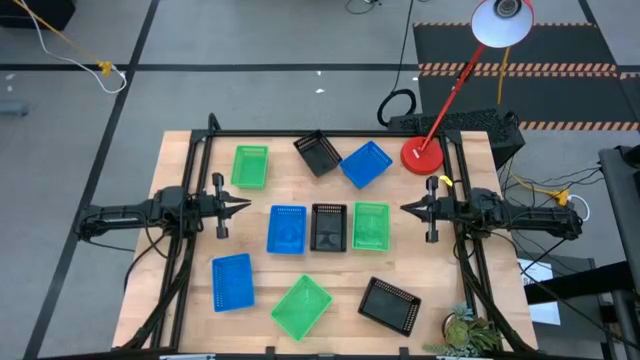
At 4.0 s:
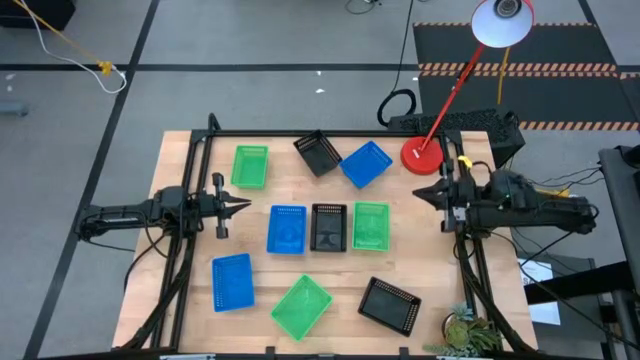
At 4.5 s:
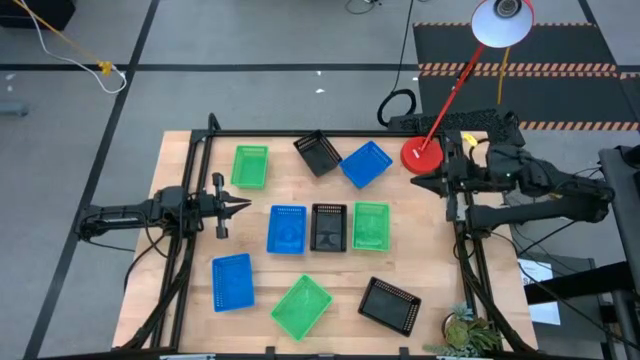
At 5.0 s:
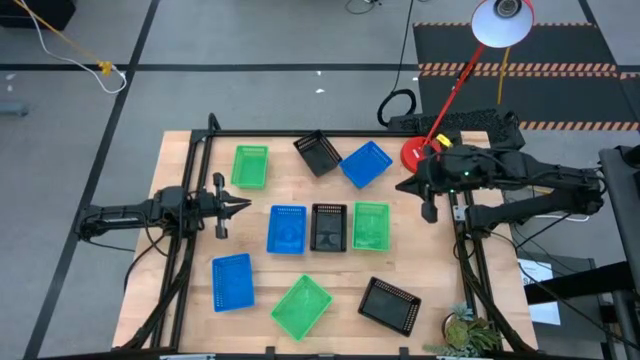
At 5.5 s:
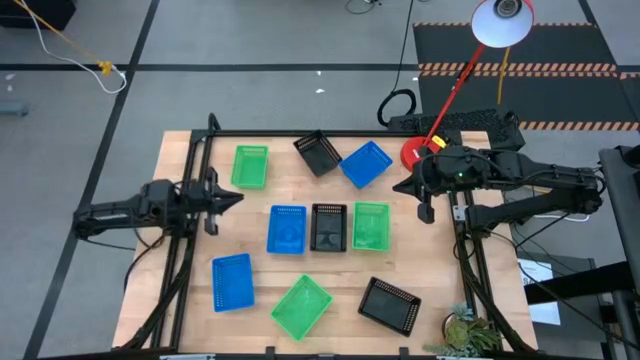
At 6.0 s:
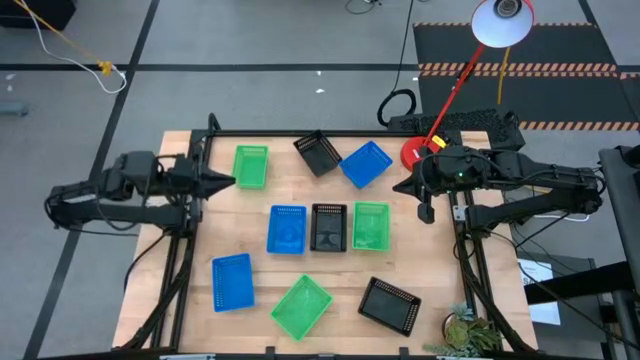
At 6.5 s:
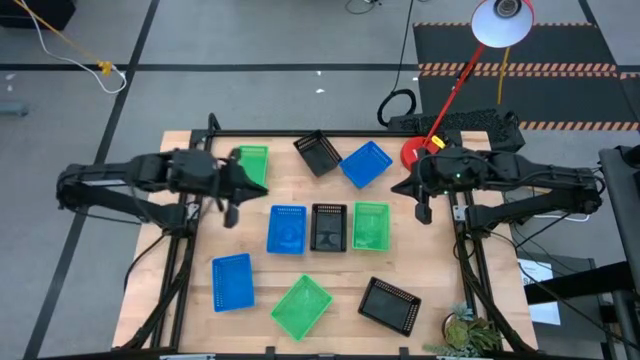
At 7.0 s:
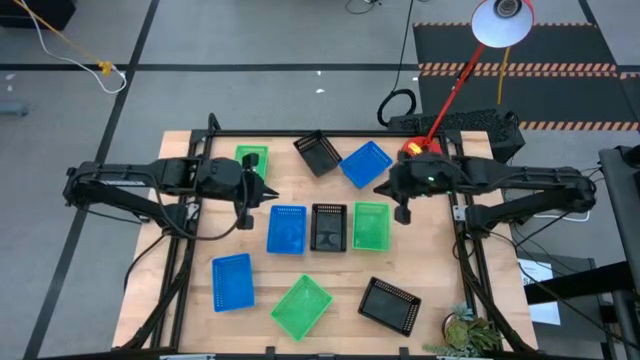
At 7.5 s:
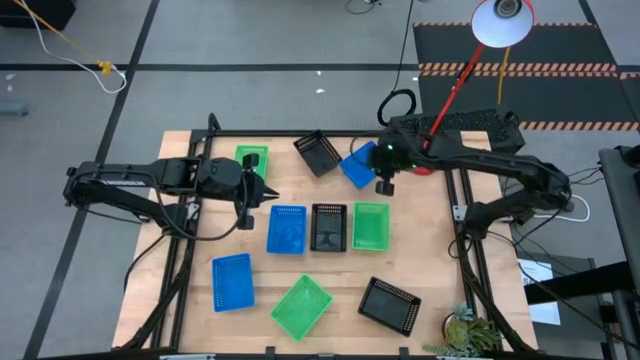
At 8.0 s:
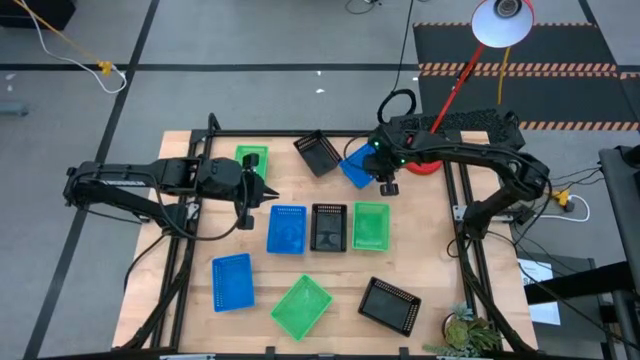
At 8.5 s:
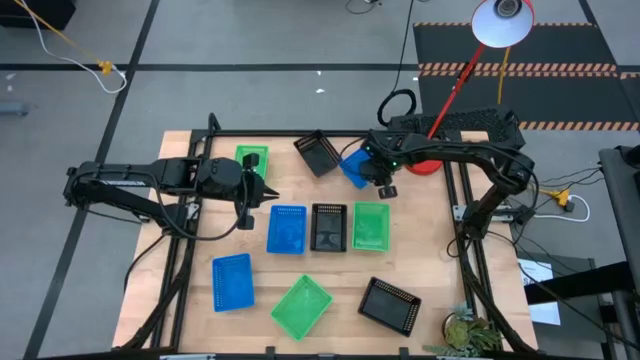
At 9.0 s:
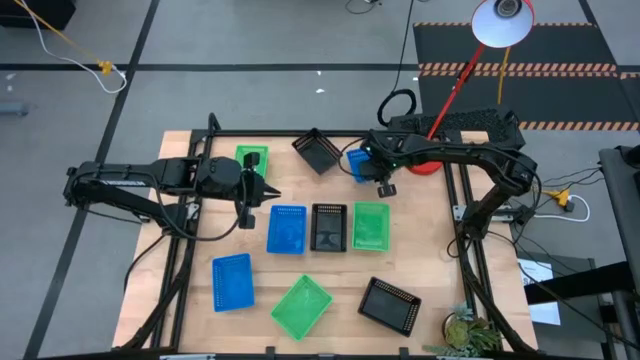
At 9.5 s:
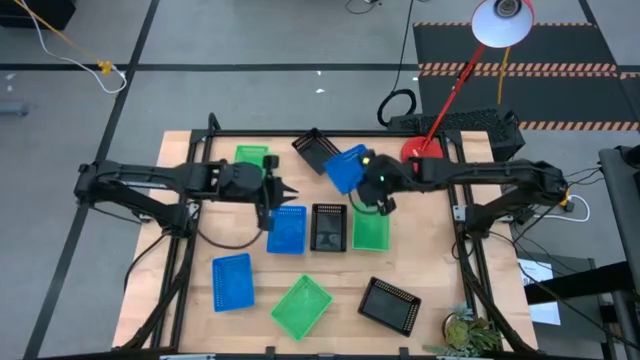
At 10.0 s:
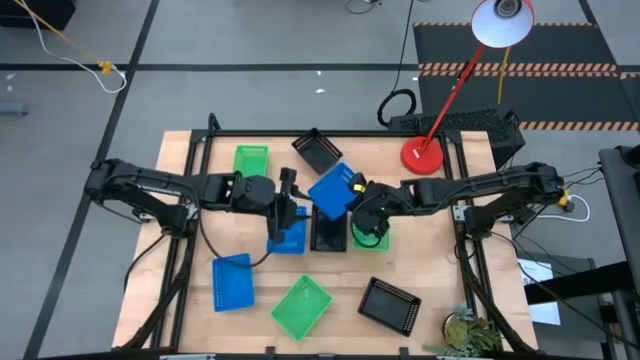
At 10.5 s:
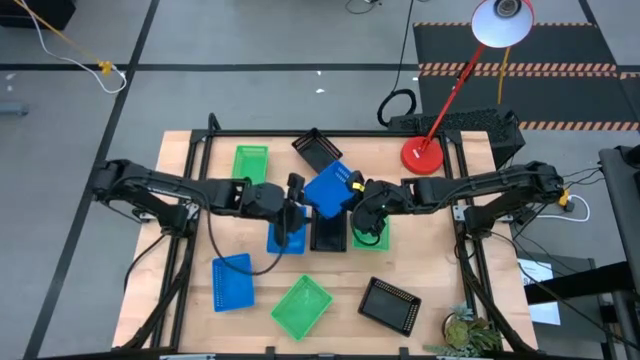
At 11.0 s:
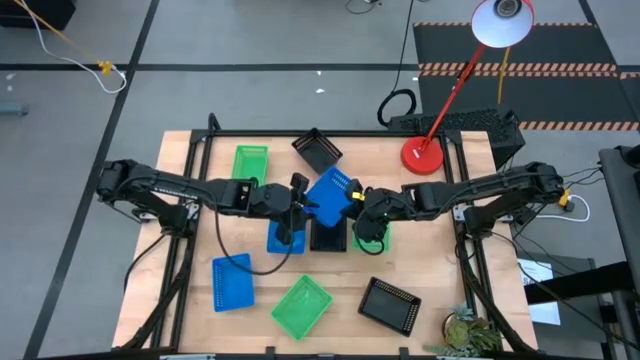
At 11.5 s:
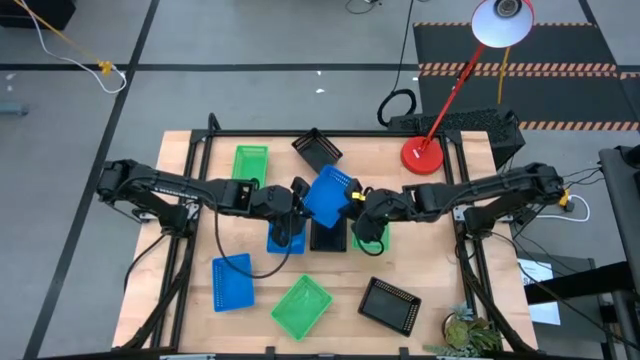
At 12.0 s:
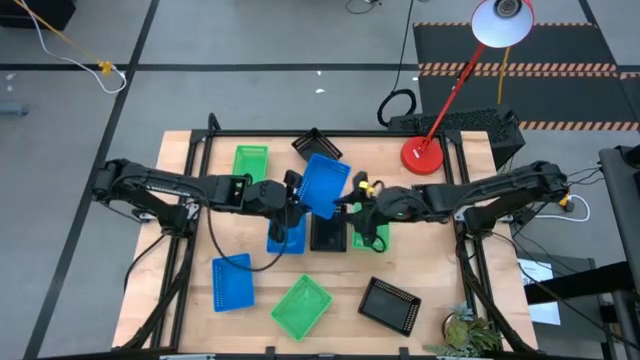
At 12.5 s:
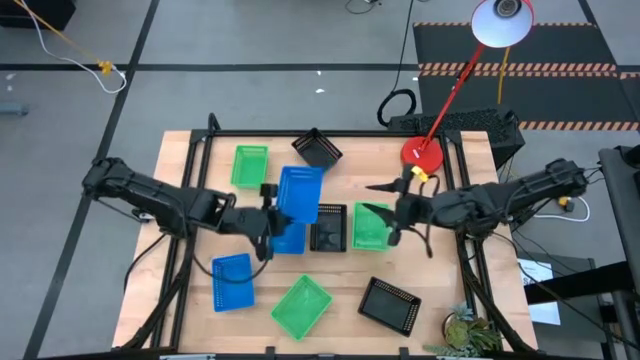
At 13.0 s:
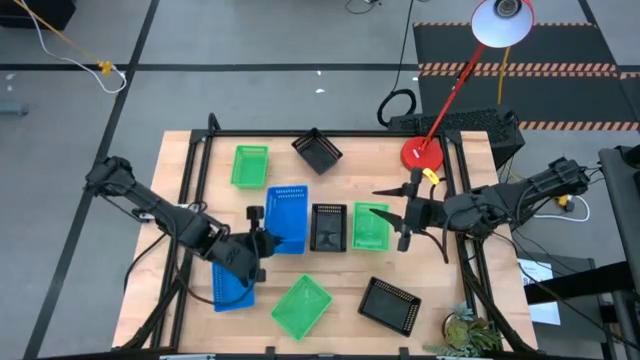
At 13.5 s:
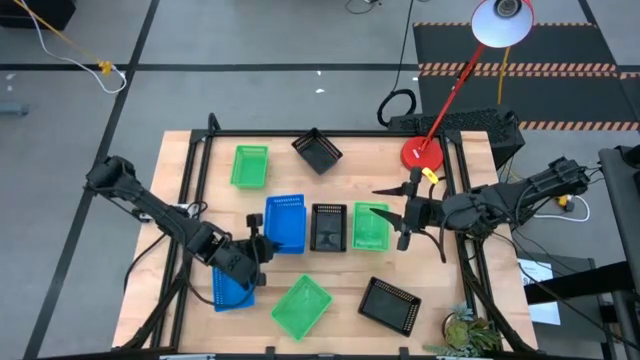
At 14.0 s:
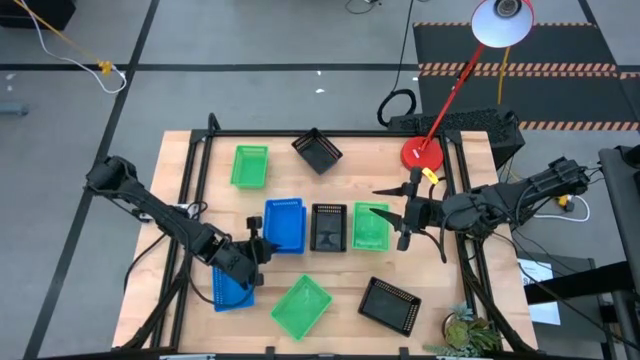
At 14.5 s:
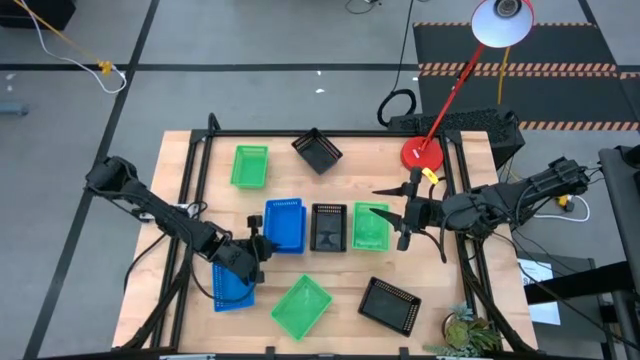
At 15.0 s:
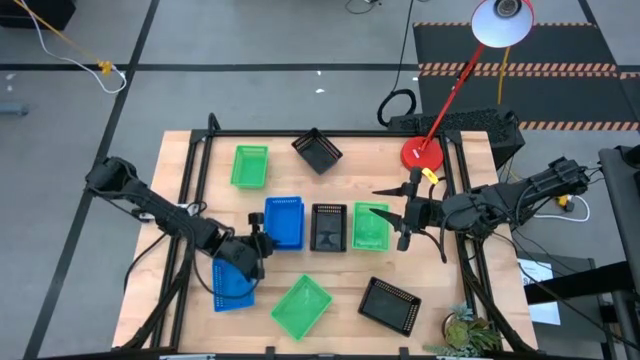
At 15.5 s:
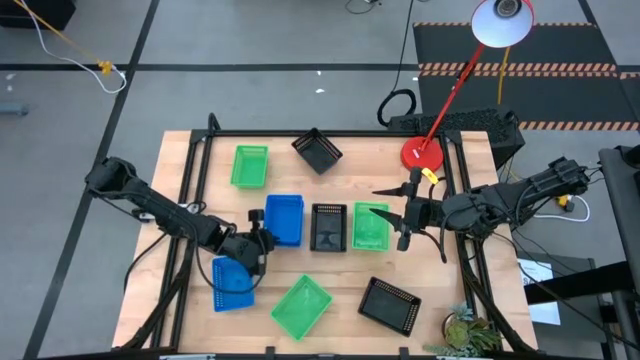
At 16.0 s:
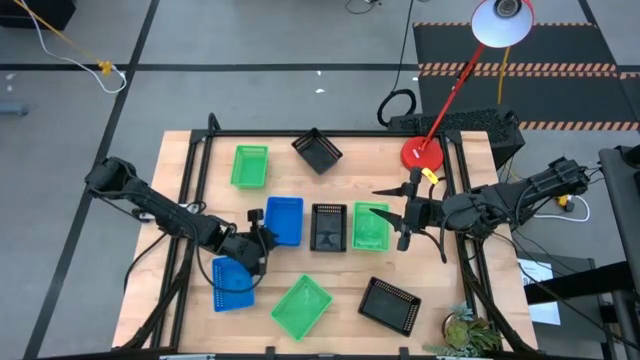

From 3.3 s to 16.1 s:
Stack the top blue bin on the middle left blue bin

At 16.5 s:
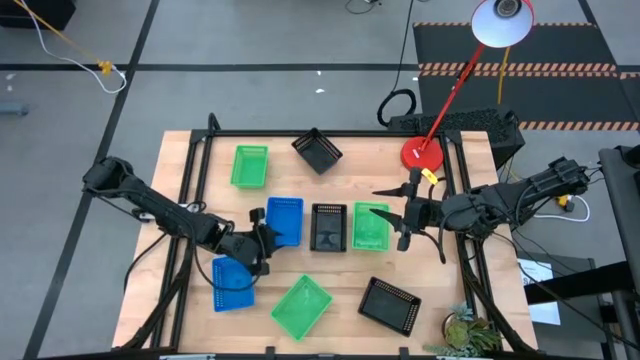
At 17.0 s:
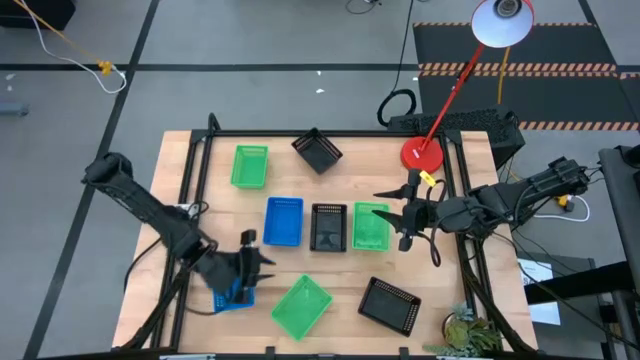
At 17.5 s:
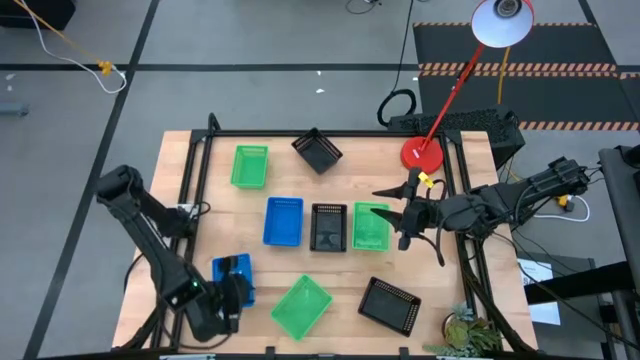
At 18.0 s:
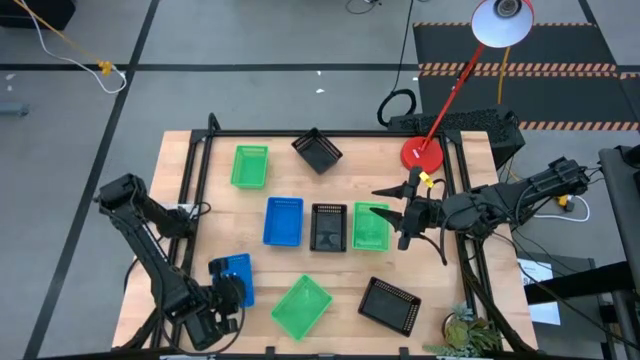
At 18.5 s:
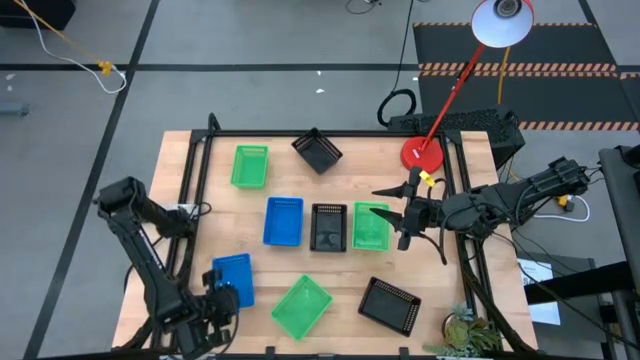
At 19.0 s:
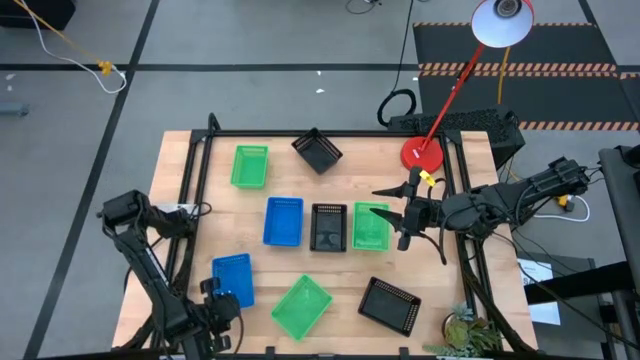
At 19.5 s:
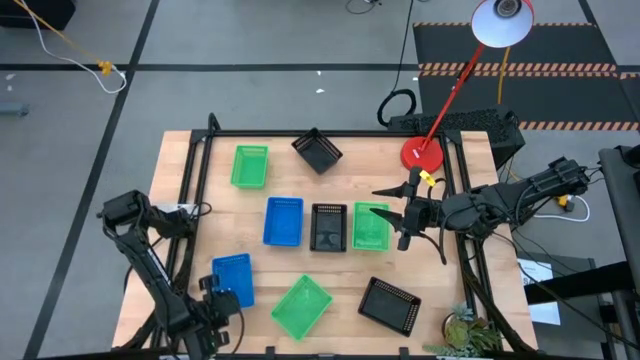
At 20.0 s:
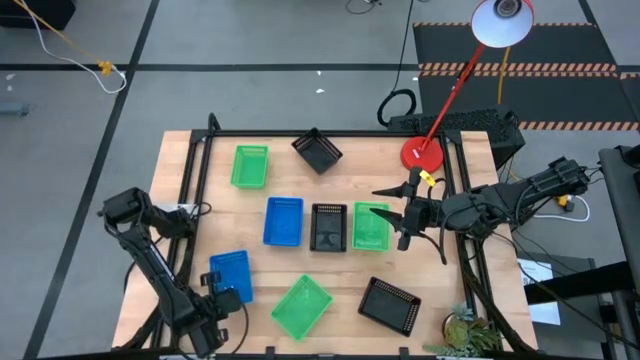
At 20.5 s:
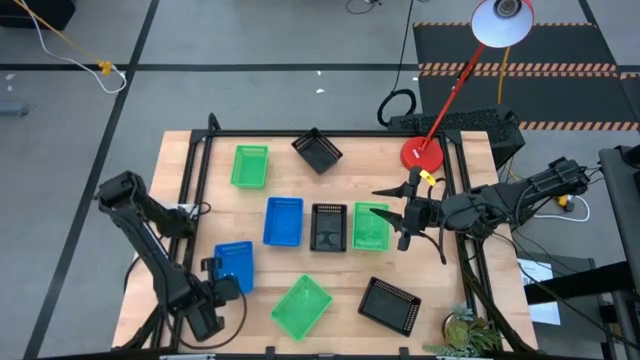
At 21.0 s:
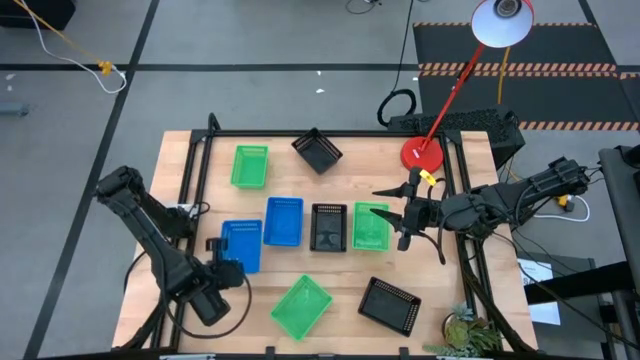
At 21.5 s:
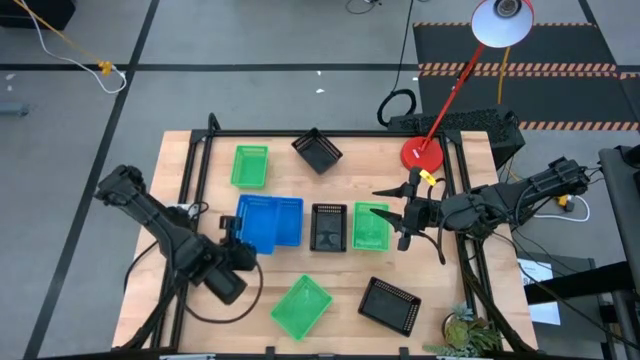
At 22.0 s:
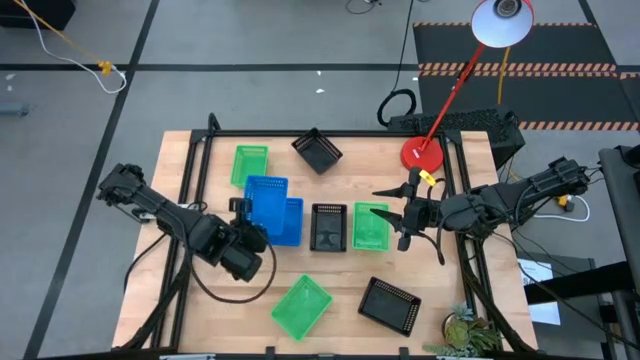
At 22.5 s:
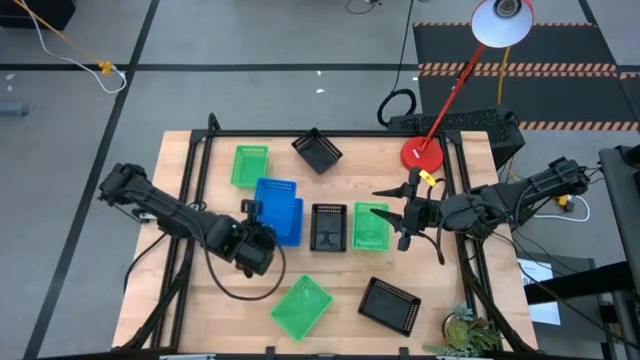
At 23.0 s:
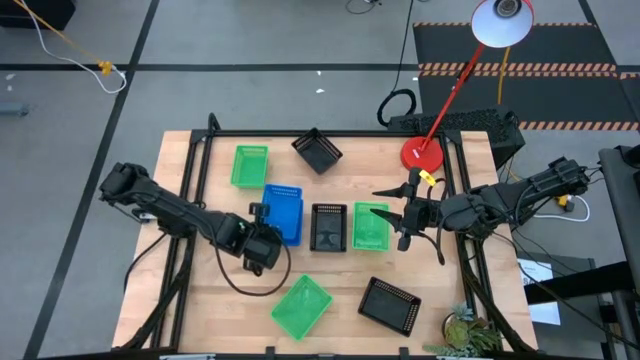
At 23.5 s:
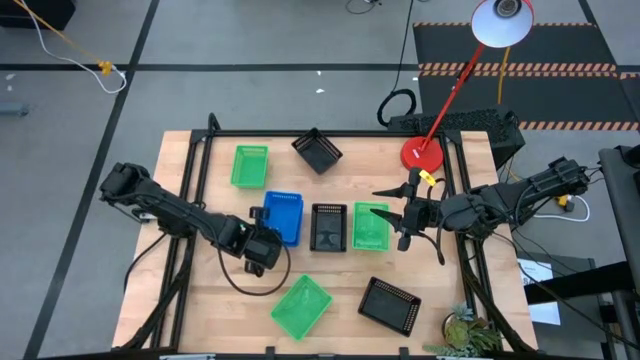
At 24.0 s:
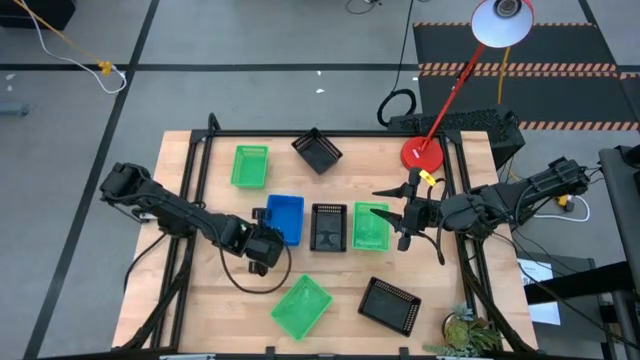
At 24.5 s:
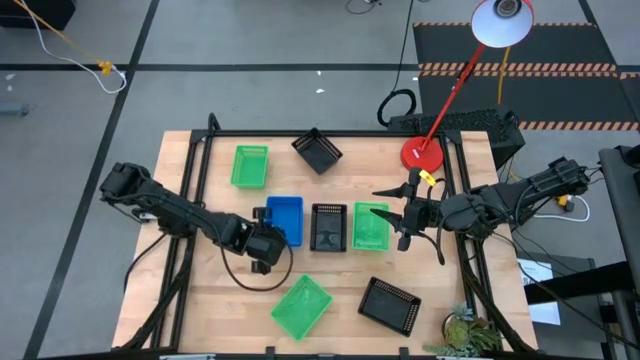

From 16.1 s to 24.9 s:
Stack the blue bin on top of stacked blue bins
